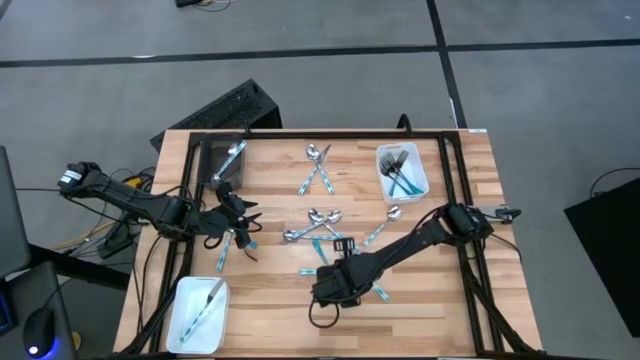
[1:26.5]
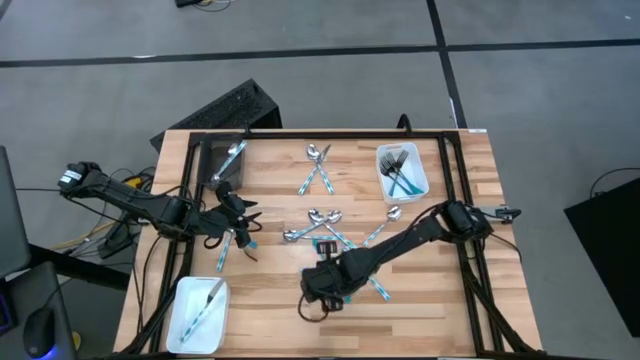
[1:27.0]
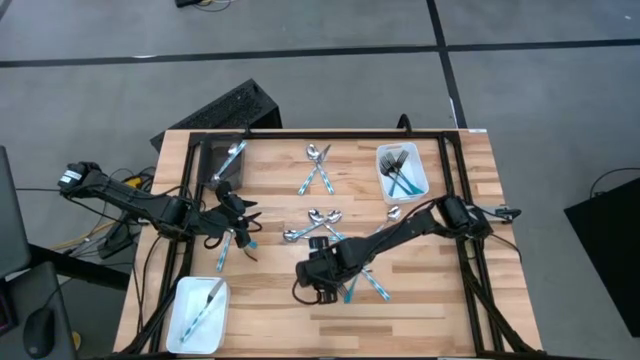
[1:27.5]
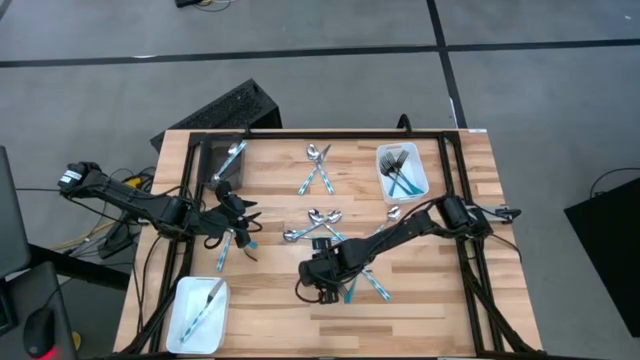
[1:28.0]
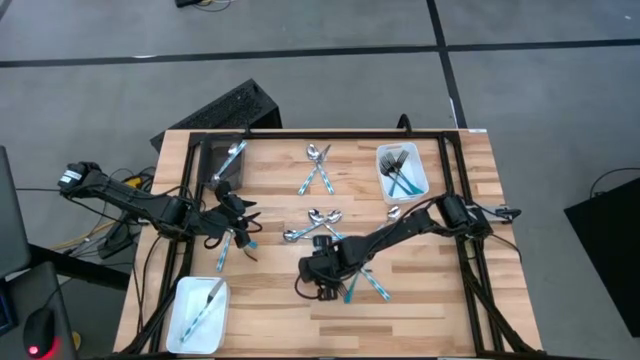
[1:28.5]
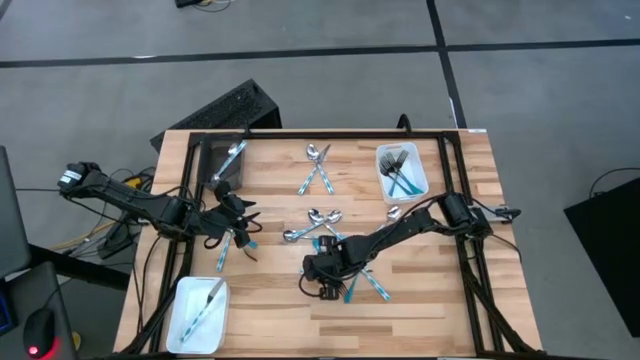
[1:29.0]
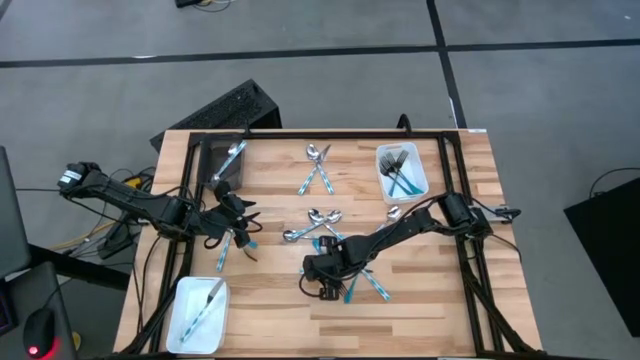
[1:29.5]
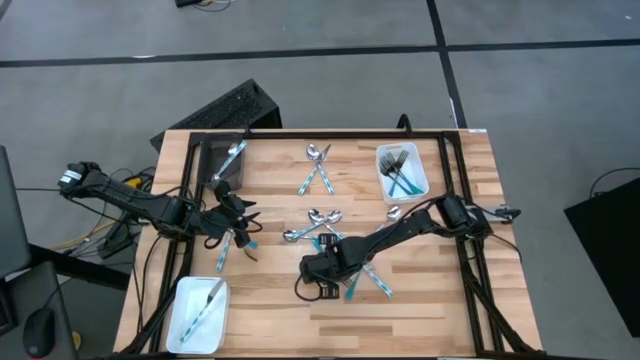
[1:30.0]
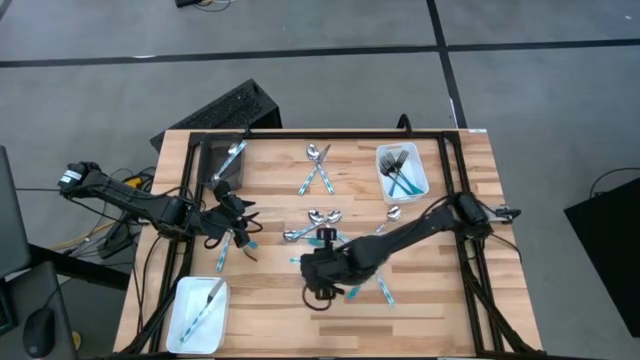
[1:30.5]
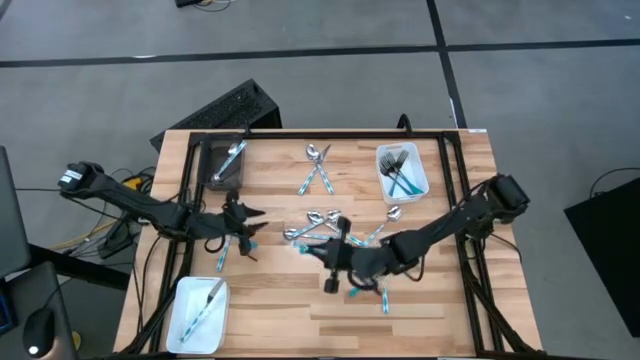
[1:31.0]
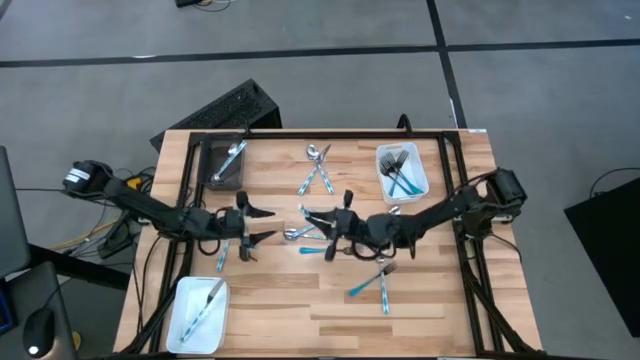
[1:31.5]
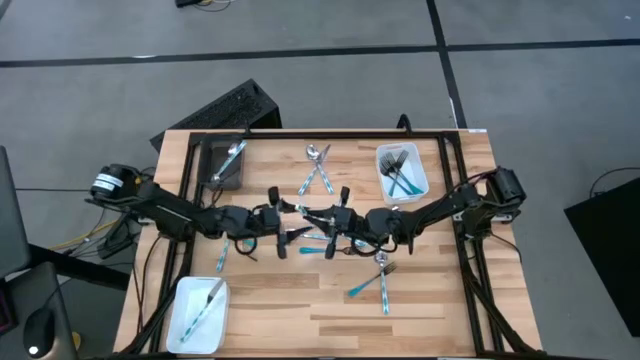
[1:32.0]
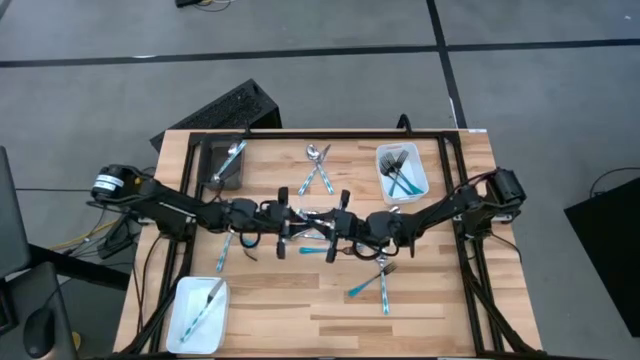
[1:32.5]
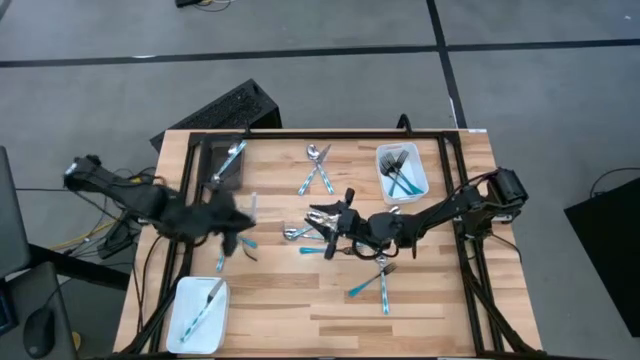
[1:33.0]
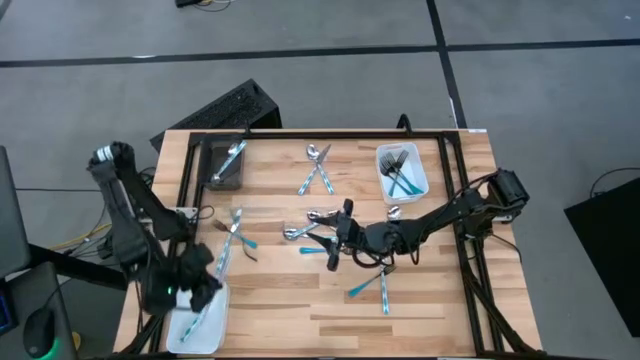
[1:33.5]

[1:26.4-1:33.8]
Task: Sort silverware by color (type)
Put the light blue table knife into the bottom white bin

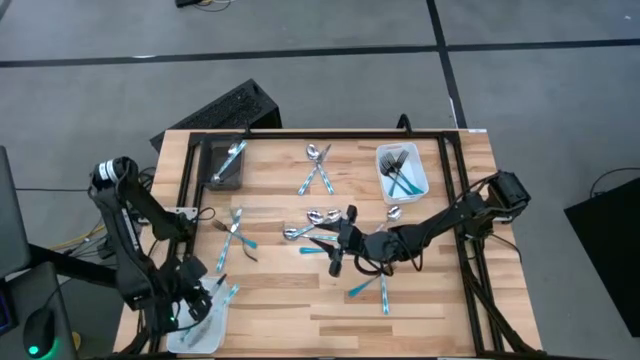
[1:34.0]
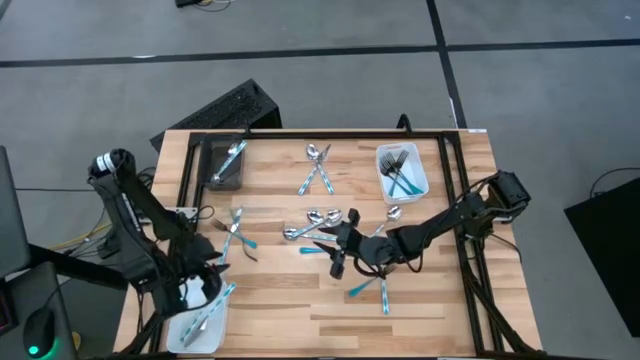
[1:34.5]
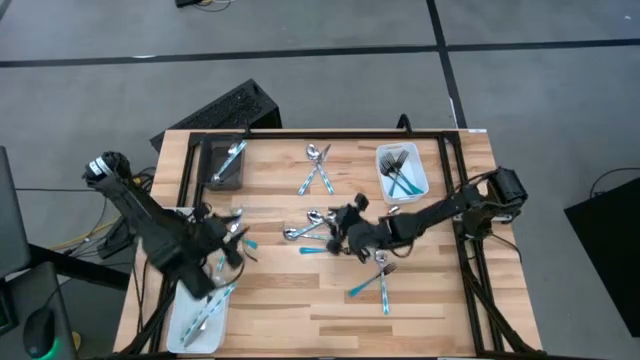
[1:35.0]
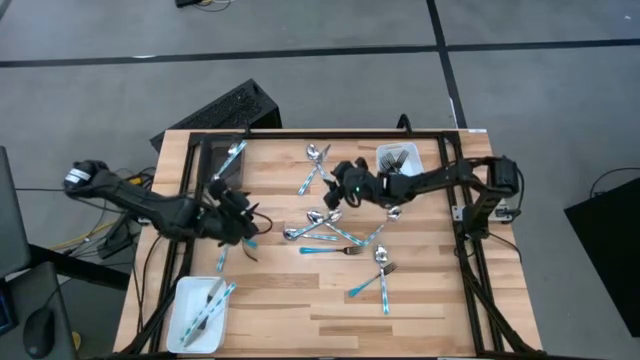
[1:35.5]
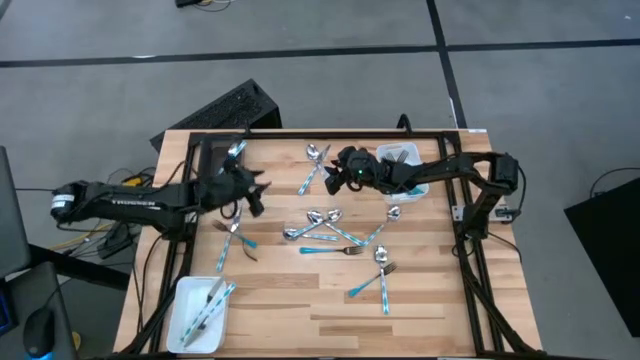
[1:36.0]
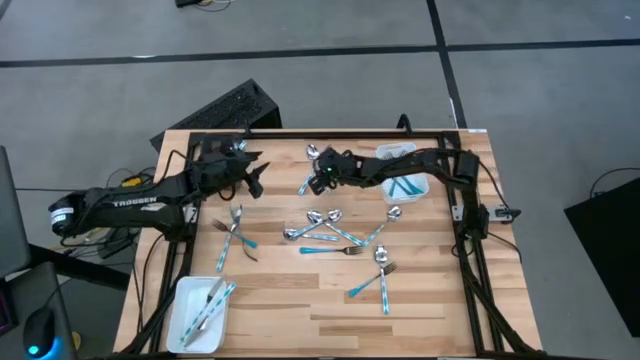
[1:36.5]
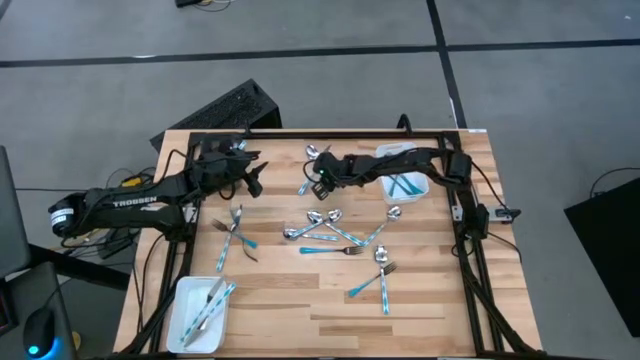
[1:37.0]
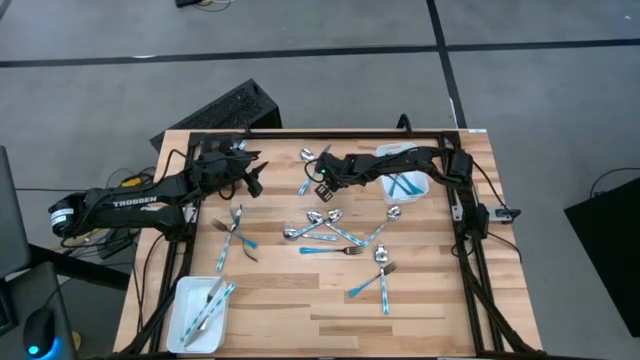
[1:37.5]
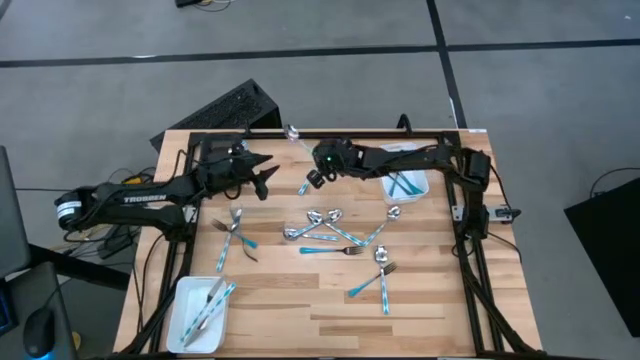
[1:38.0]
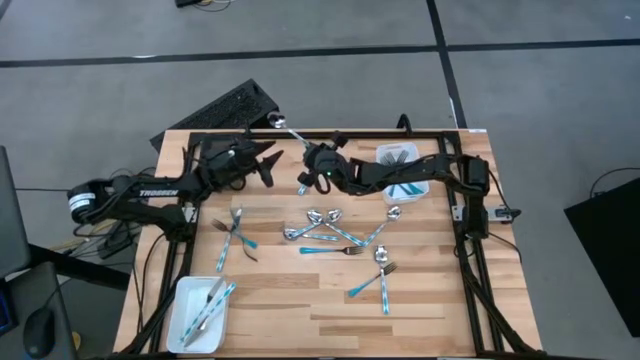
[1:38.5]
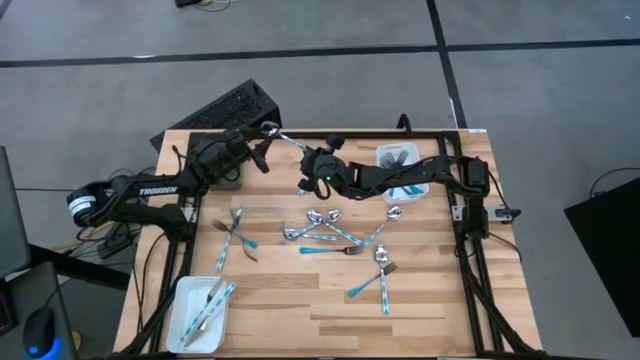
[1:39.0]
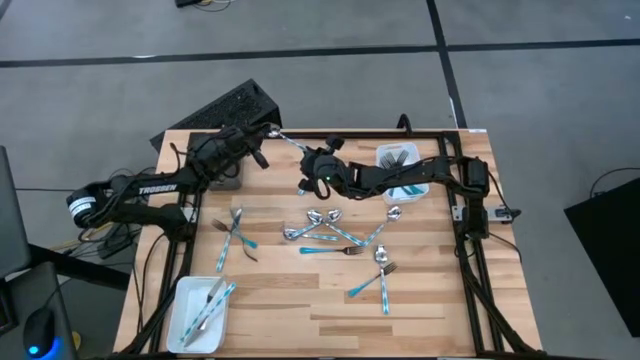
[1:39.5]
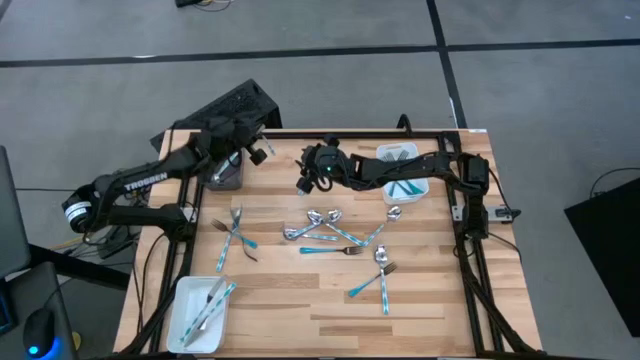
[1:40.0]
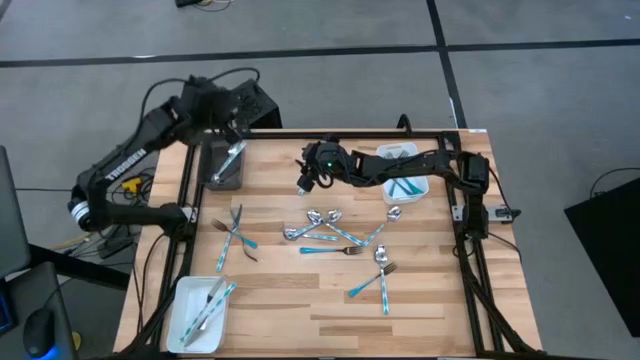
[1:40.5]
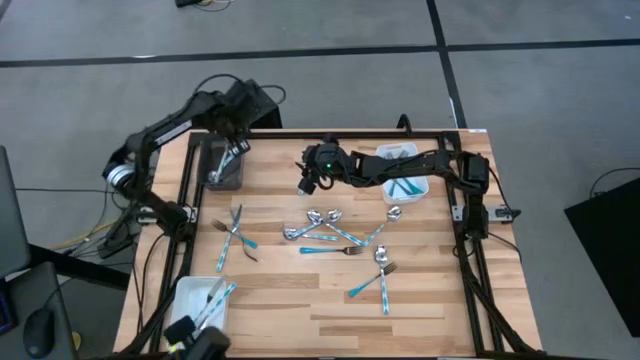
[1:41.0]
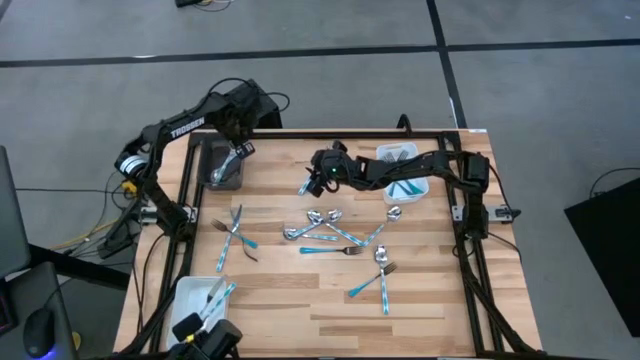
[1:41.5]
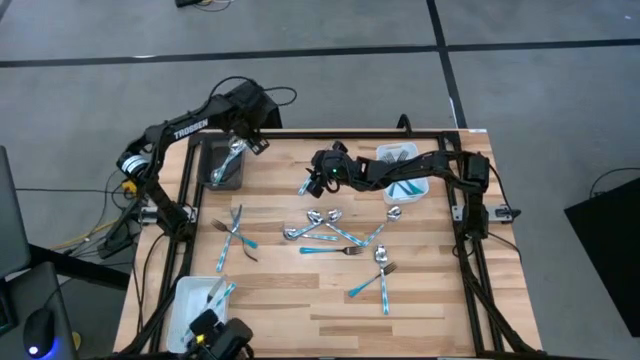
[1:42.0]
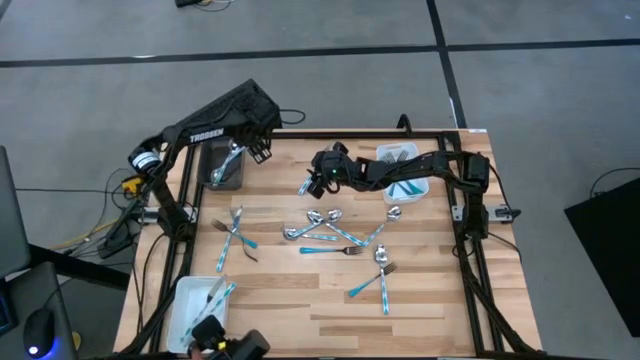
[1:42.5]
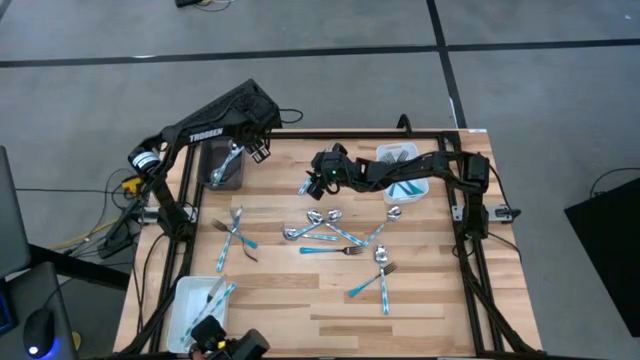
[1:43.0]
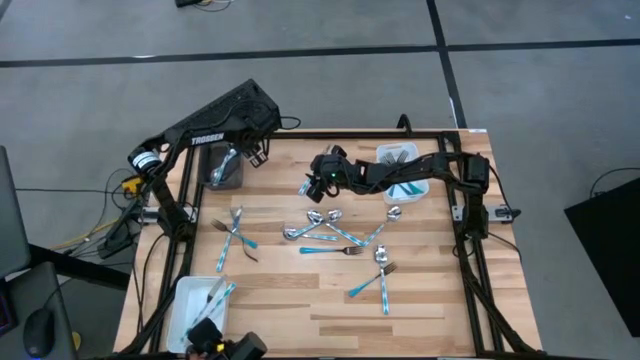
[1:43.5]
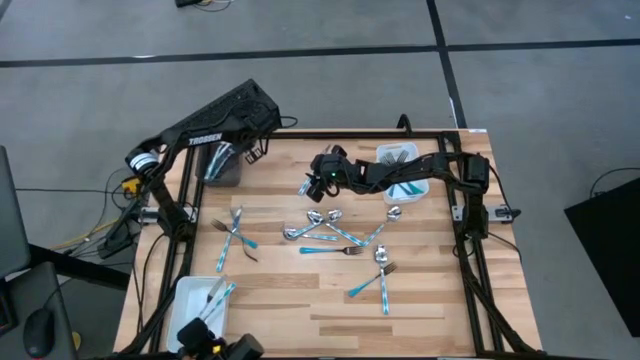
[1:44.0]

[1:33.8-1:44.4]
Put the light blue spoon into the black bin

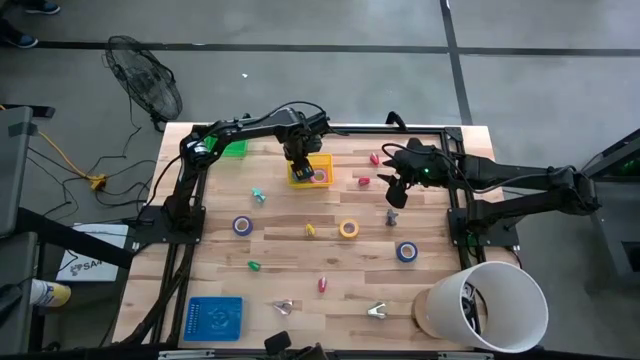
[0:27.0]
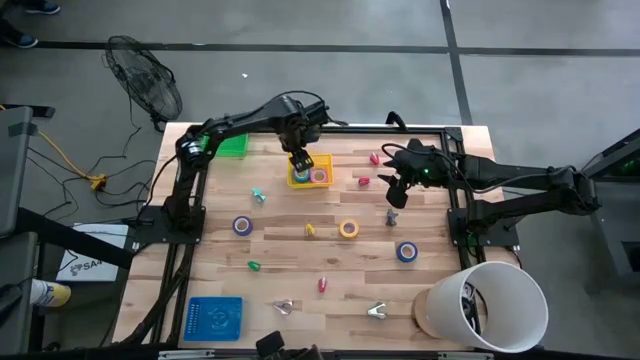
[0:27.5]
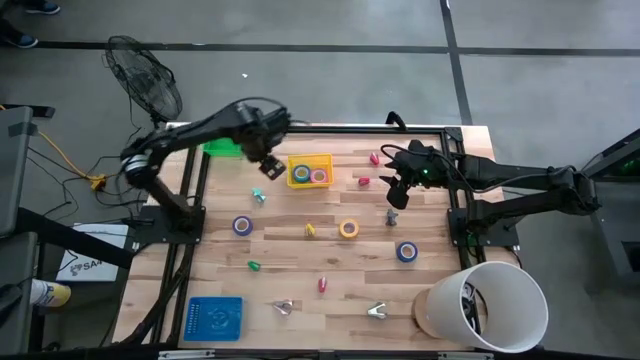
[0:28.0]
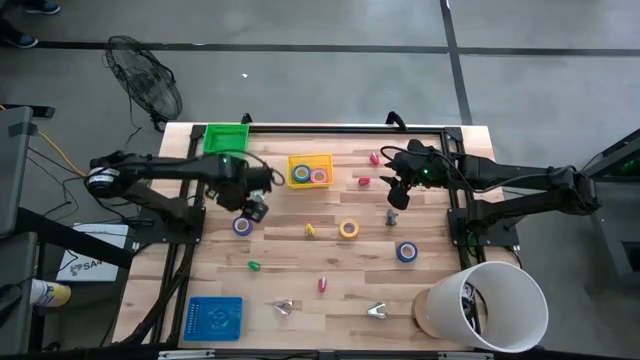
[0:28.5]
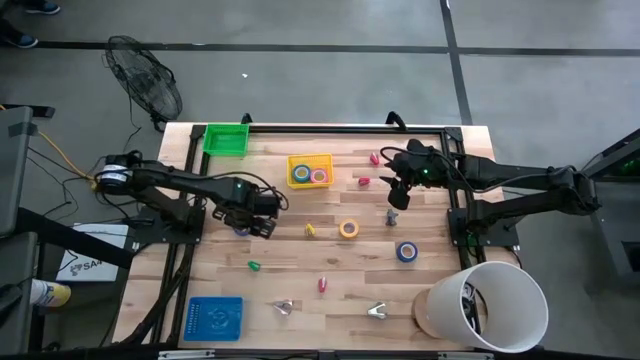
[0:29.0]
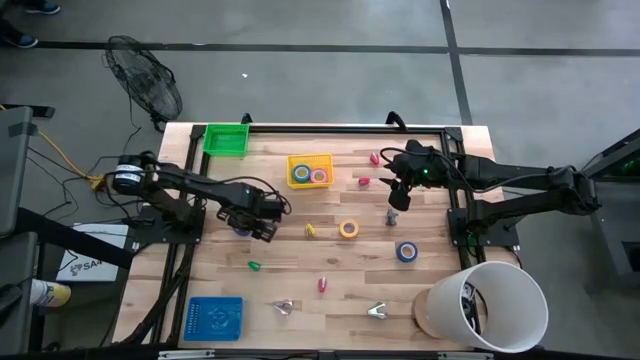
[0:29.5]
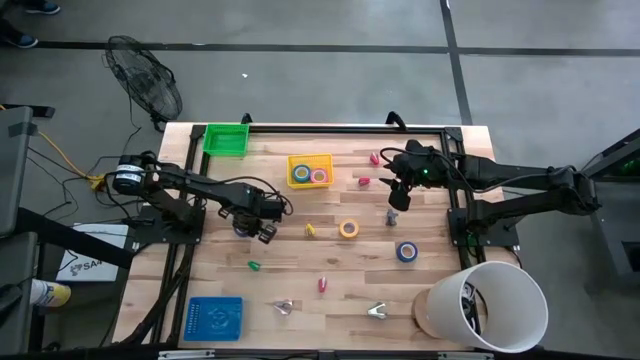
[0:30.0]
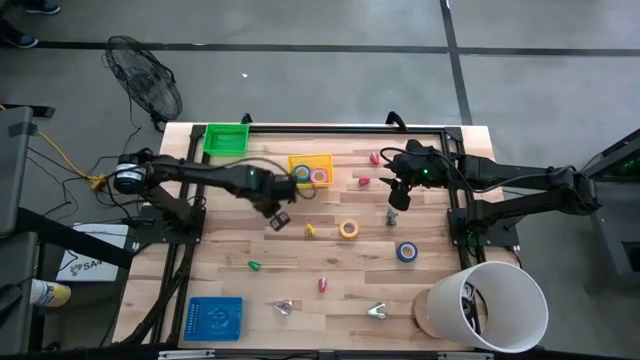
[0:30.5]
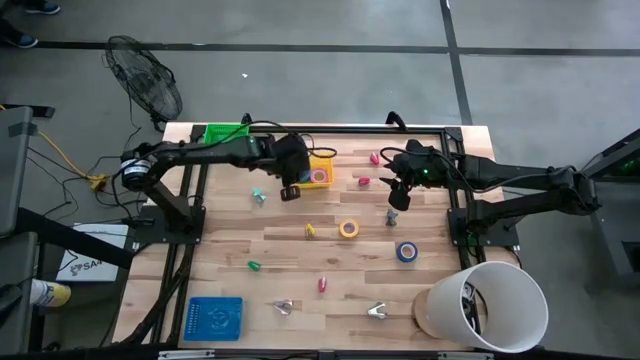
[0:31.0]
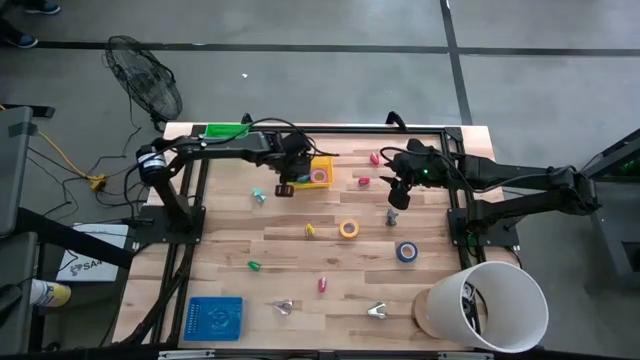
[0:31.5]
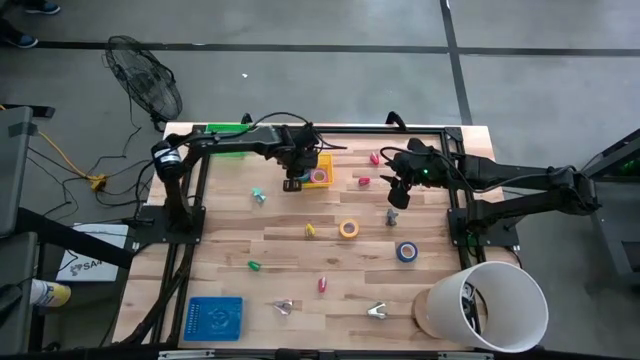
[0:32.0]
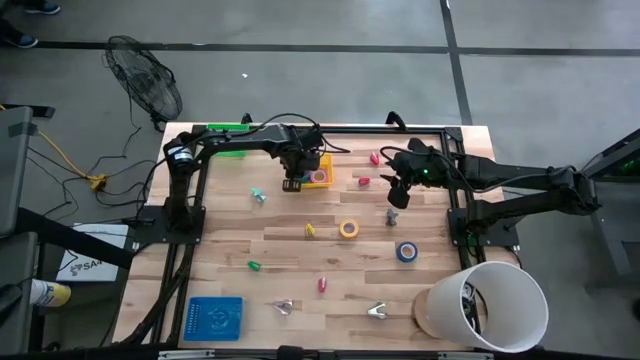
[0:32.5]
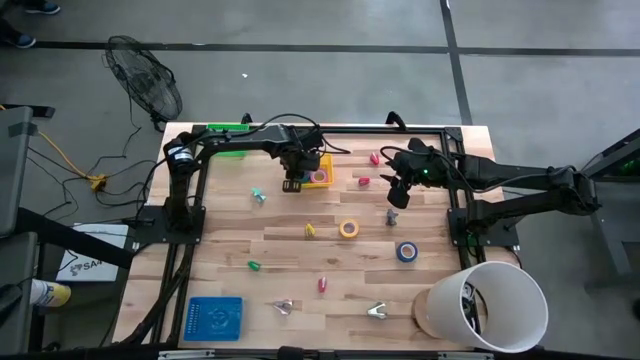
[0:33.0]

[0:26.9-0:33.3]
Task: Pick and place Stapler, Stapler remover, tape
Put the dark blue tape into the yellow bin
